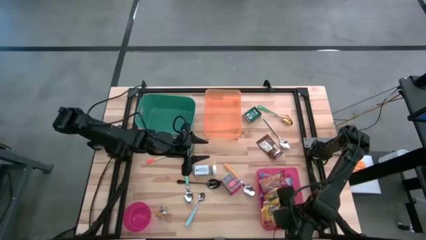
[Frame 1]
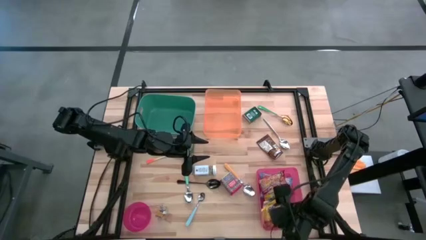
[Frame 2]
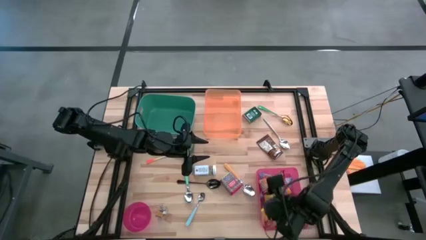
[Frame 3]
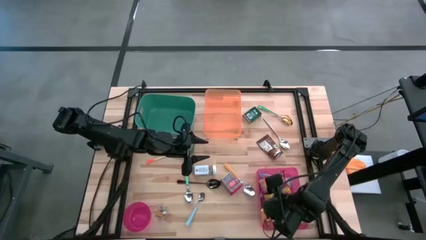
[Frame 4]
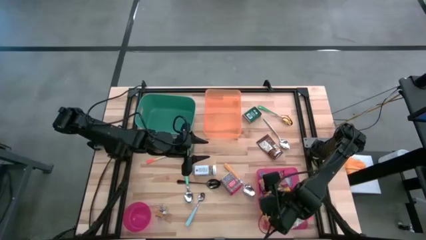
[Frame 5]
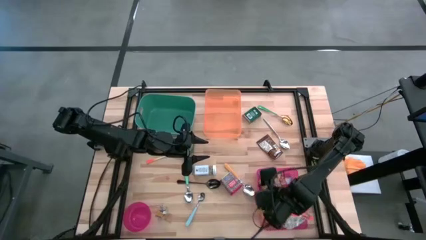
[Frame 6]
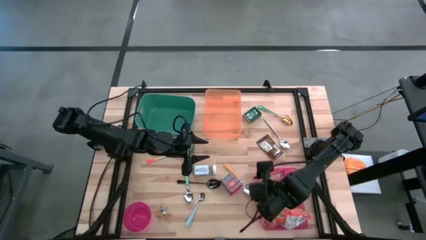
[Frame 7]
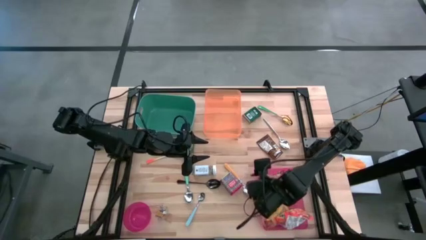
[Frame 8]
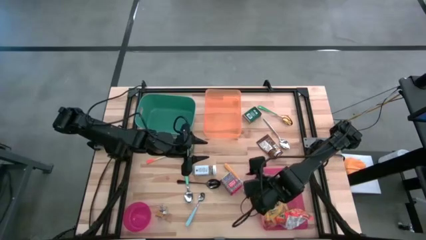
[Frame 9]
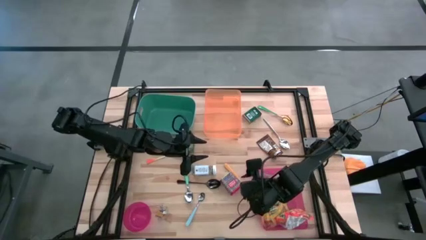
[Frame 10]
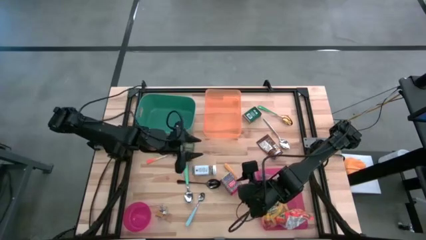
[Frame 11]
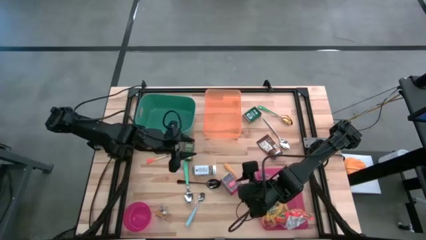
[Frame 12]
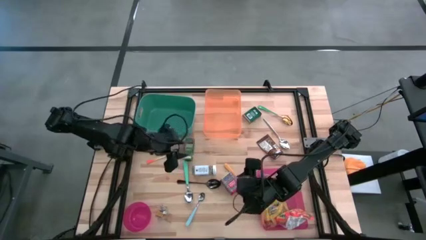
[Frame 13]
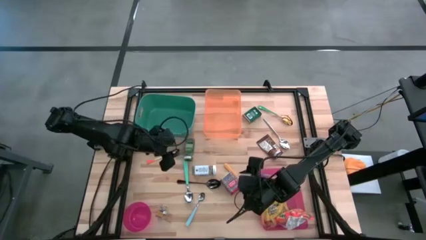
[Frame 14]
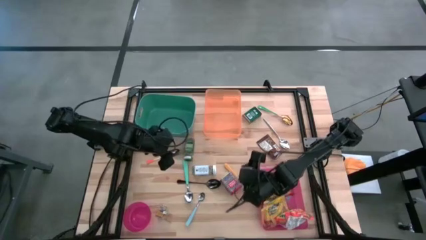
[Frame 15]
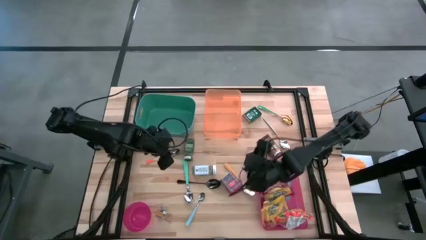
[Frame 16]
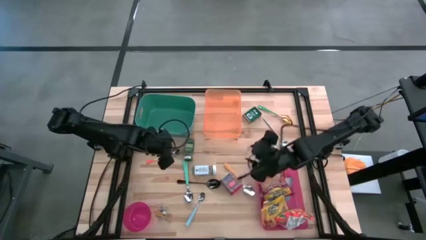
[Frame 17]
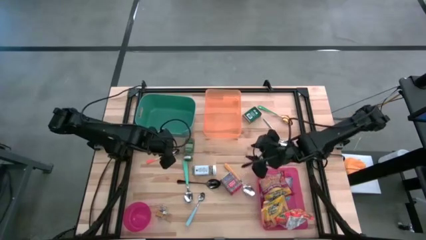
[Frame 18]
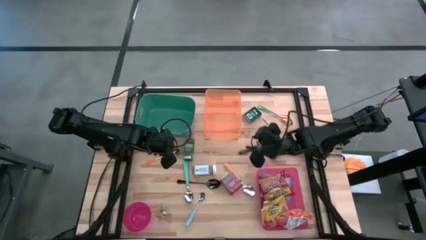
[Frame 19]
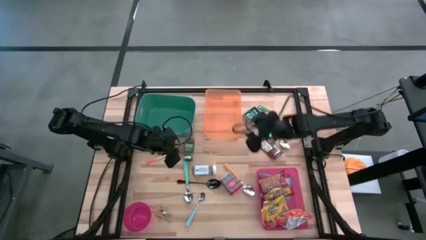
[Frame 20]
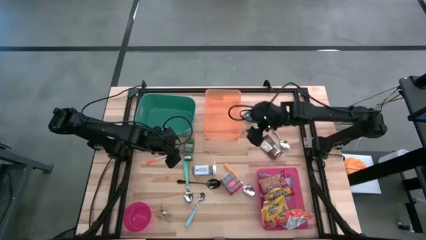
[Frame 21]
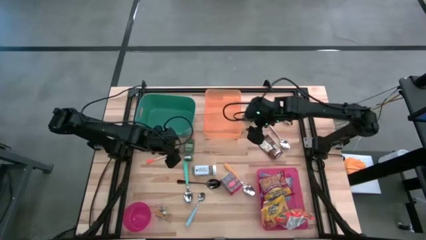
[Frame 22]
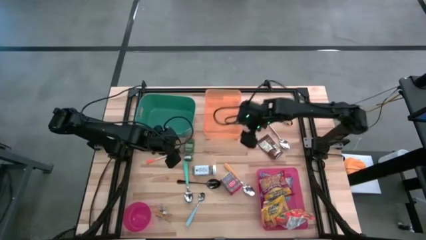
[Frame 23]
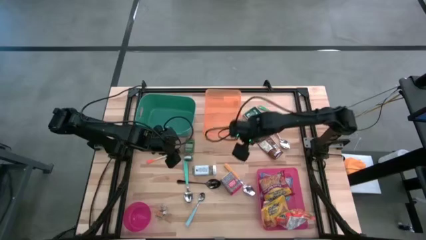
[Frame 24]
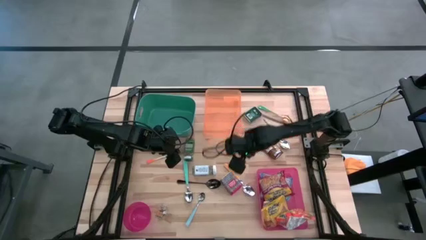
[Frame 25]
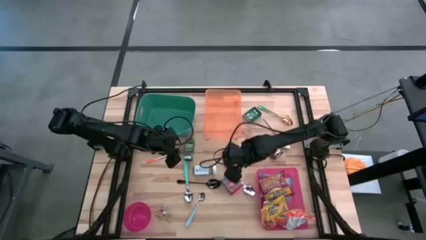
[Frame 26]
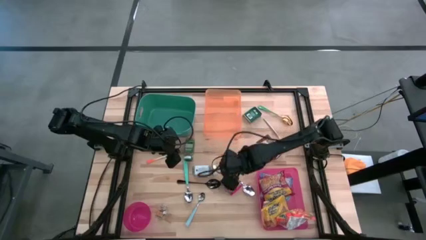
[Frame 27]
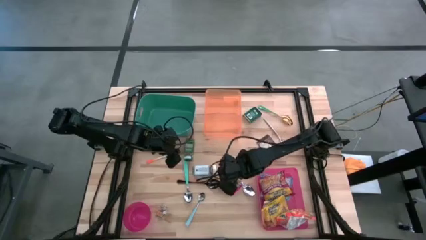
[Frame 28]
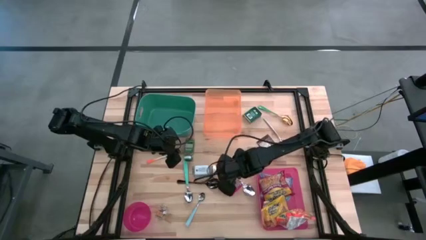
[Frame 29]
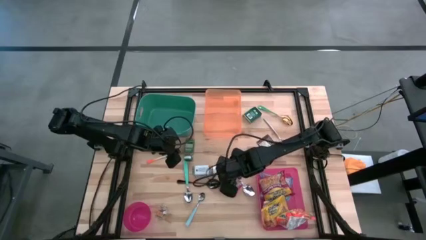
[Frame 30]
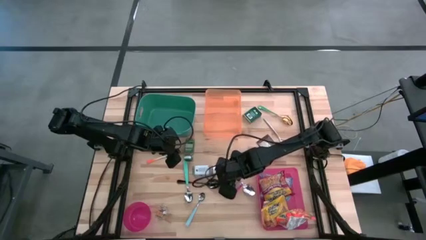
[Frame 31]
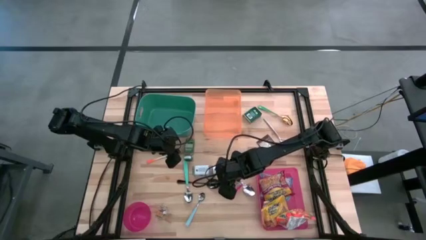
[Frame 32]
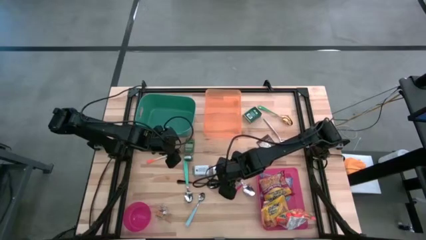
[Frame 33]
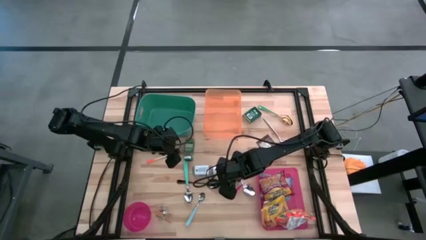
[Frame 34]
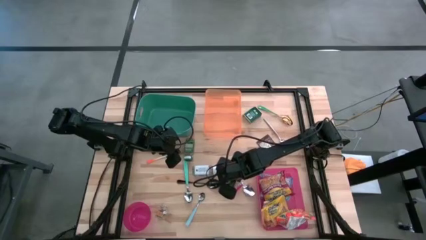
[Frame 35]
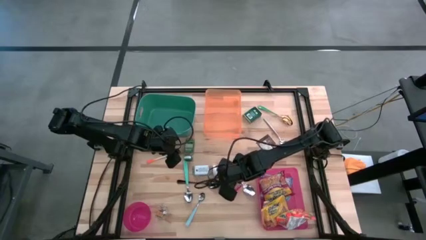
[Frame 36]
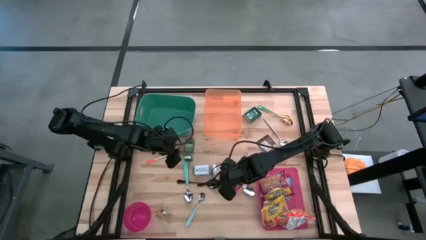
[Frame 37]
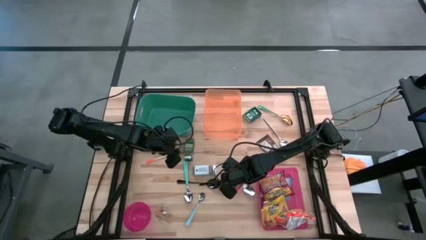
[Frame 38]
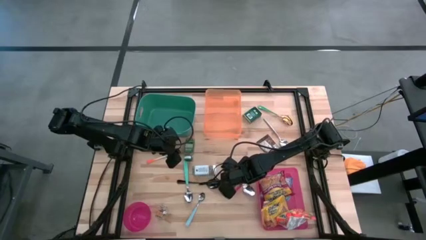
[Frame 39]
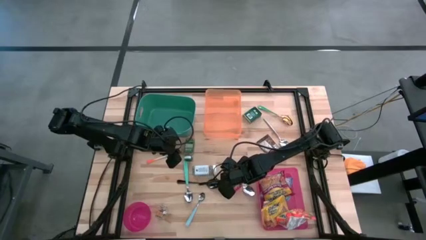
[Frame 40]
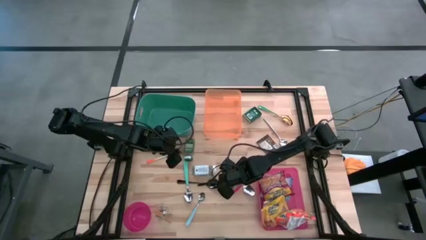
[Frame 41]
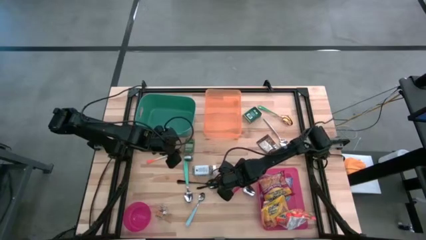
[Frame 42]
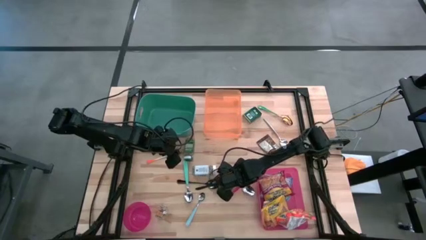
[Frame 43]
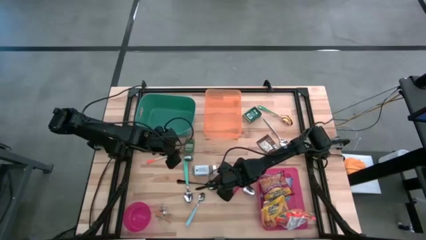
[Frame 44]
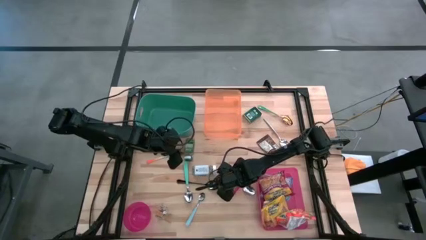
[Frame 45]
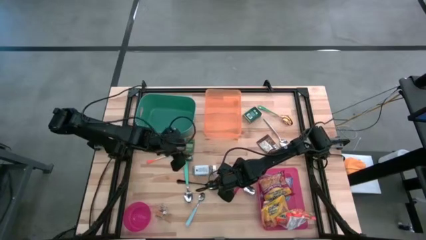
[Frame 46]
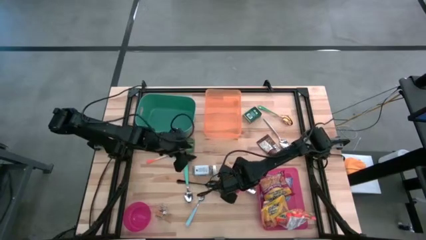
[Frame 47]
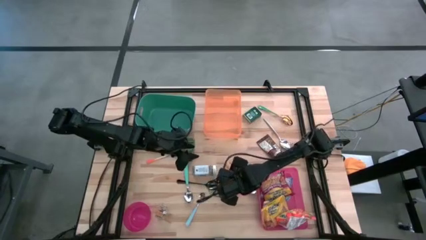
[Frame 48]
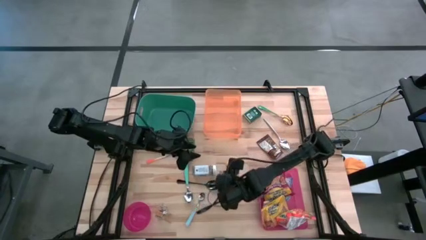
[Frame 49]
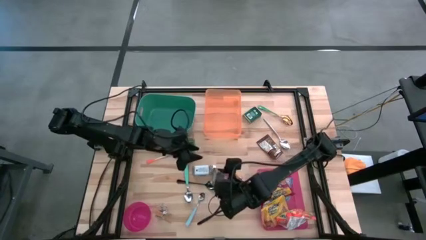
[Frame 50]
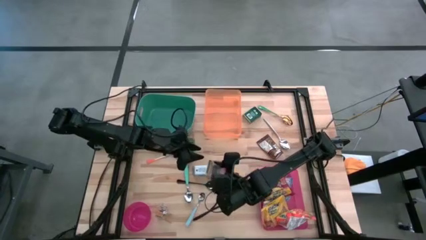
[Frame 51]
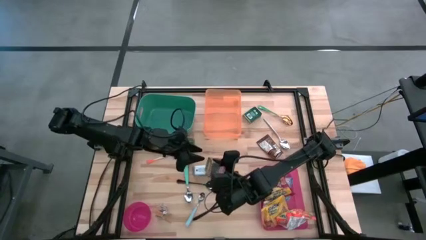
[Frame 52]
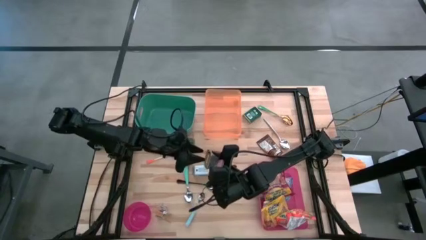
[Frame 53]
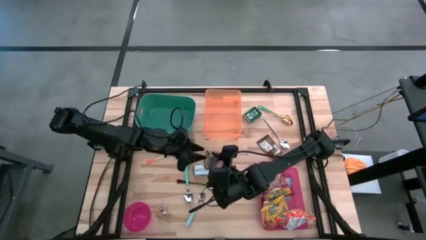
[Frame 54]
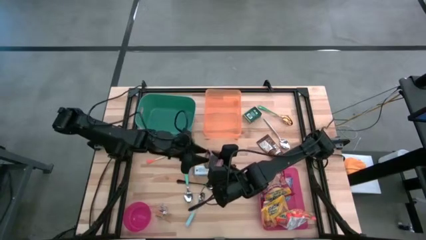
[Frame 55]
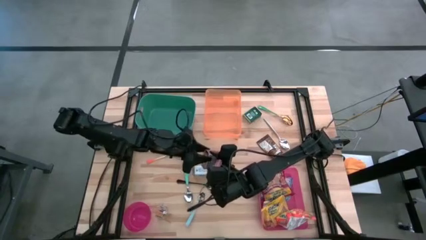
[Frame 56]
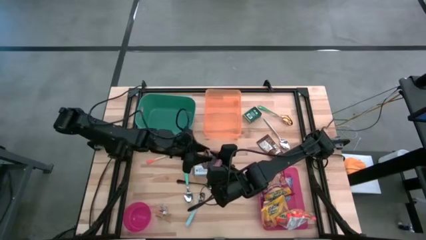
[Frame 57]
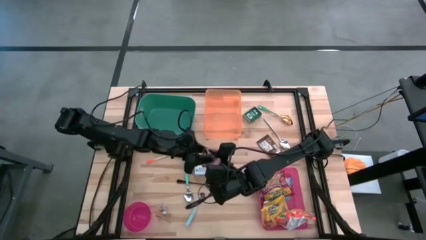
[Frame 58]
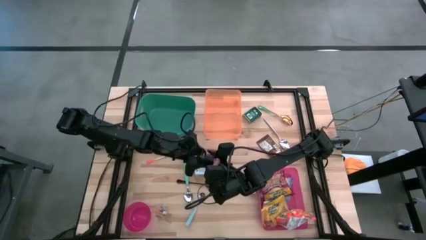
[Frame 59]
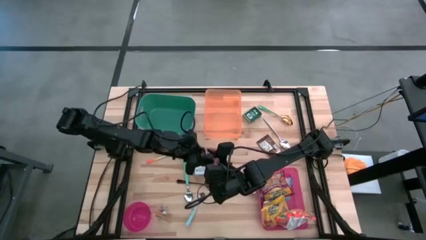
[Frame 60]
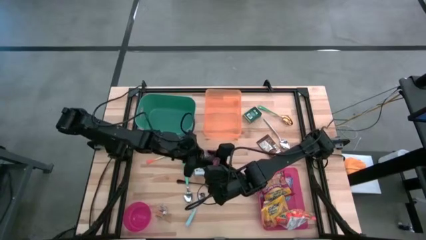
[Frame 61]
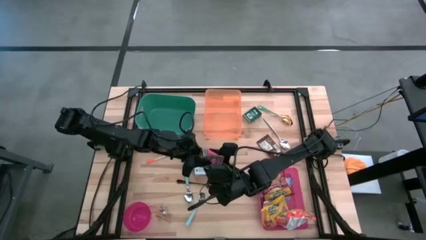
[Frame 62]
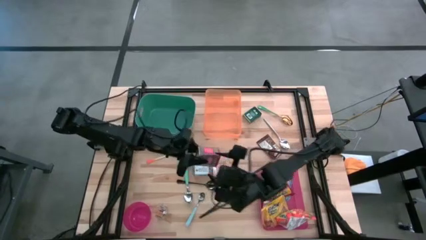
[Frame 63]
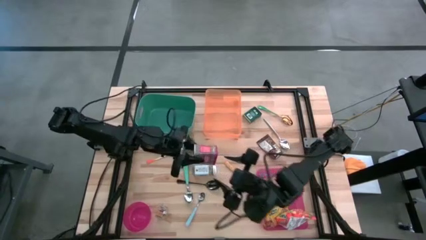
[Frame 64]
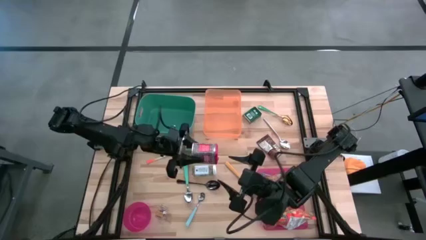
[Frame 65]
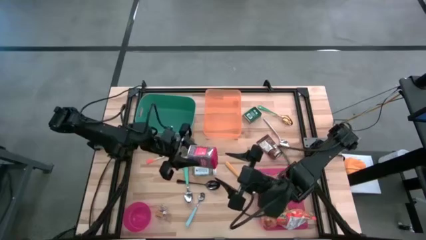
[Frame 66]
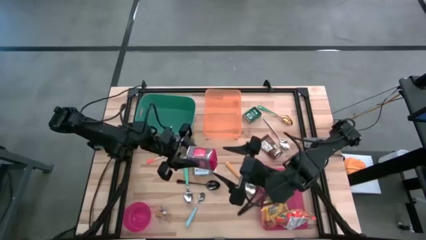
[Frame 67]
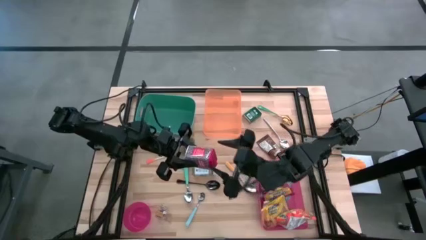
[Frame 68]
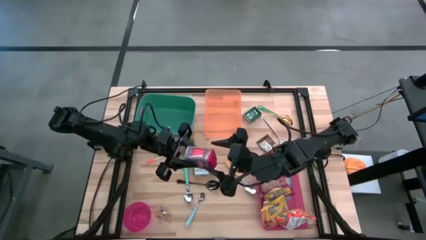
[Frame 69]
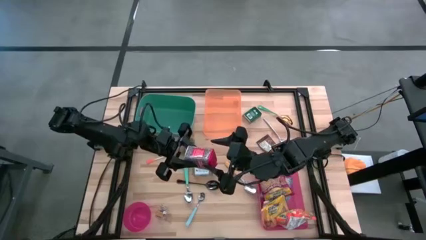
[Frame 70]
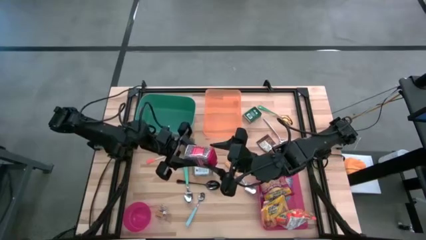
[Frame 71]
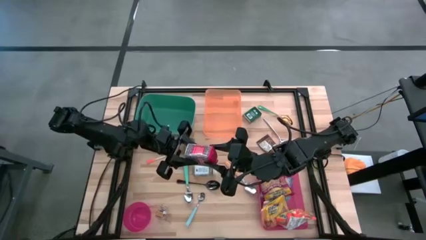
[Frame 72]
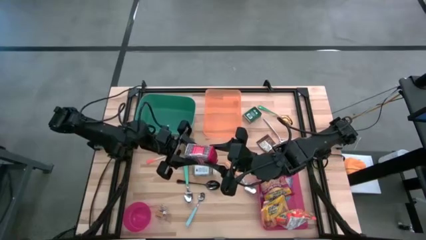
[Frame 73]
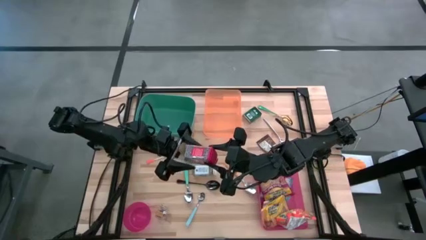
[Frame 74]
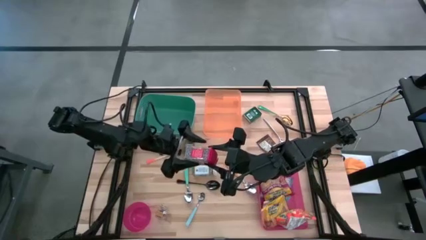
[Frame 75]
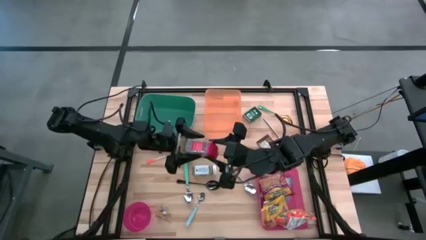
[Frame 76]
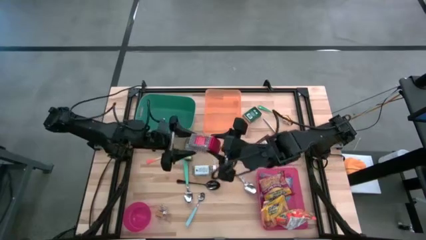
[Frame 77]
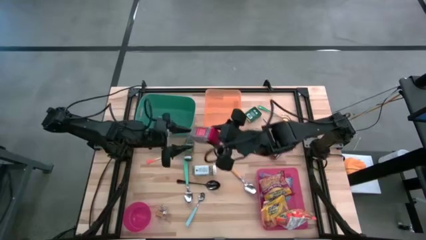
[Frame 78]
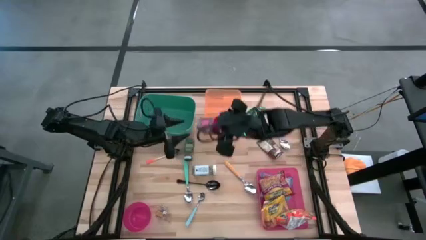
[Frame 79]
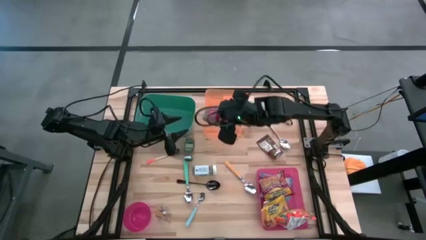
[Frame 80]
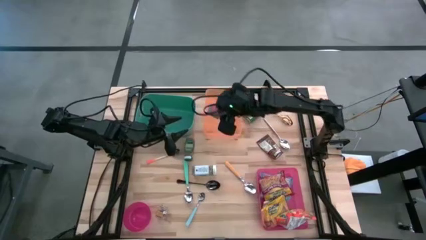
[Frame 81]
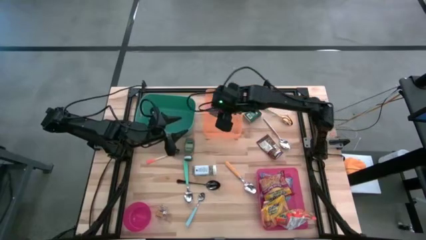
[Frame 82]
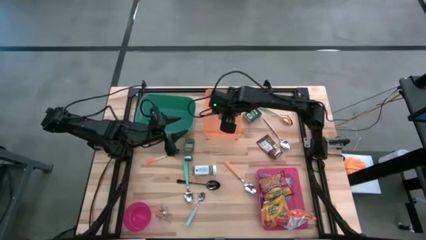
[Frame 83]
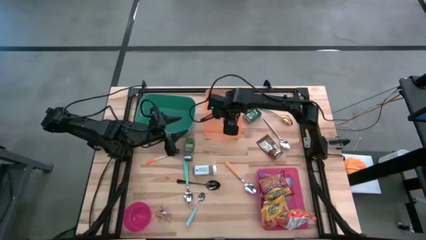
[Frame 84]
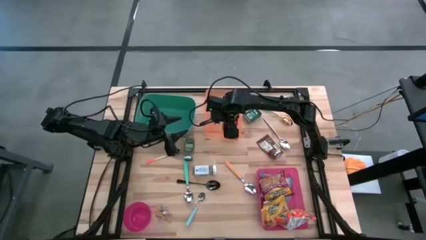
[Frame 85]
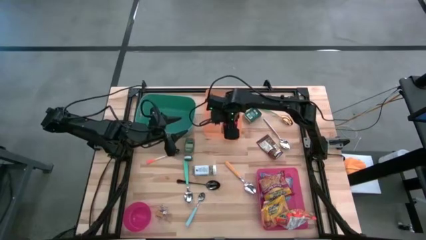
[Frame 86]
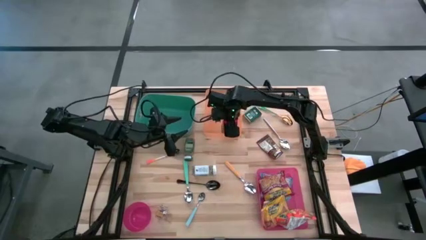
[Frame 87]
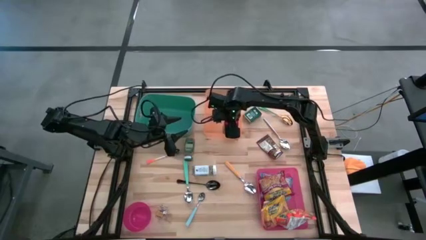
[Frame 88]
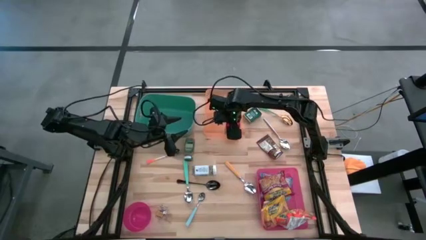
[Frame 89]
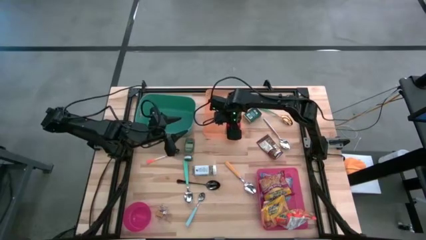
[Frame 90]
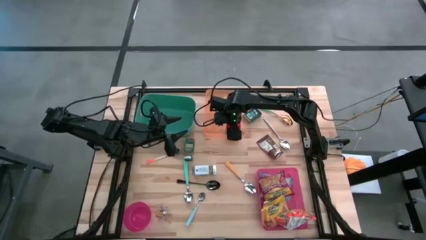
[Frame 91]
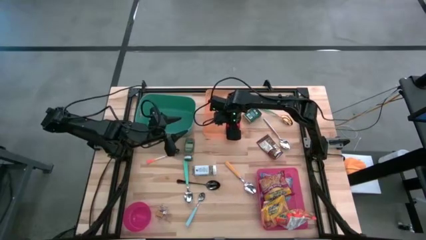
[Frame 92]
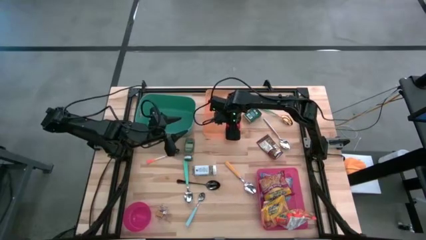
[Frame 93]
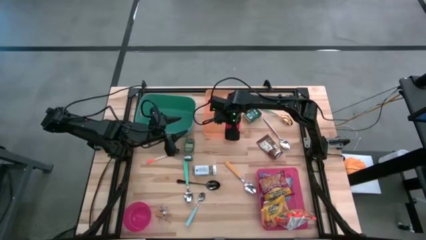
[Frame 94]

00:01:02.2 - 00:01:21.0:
Put the red seasoning can into the orange bin
